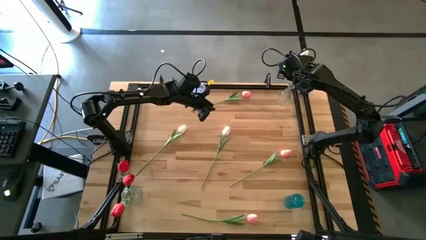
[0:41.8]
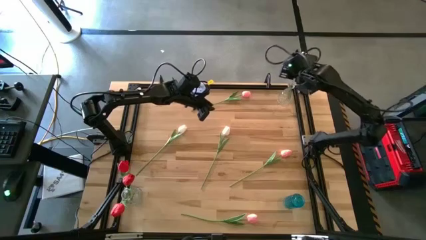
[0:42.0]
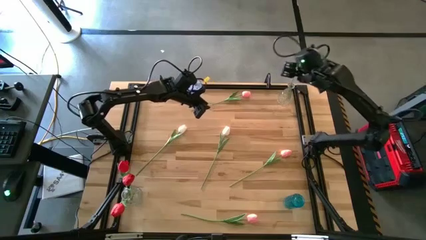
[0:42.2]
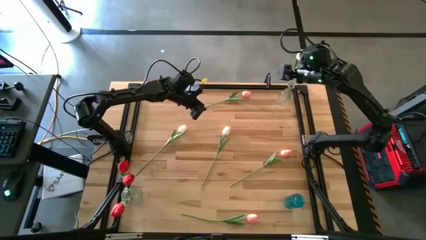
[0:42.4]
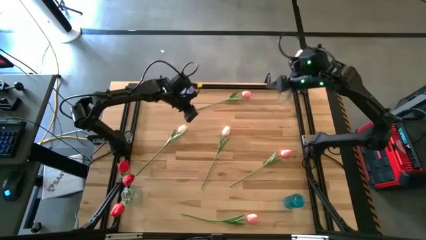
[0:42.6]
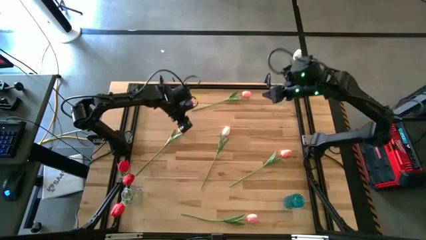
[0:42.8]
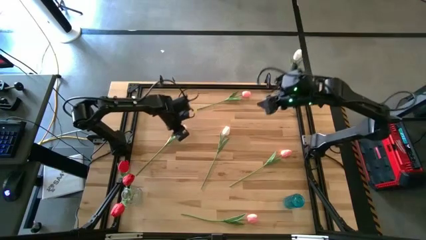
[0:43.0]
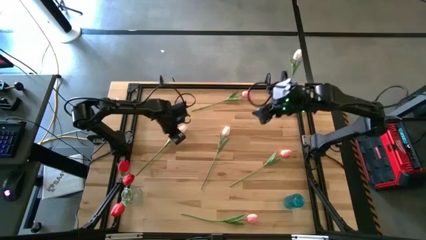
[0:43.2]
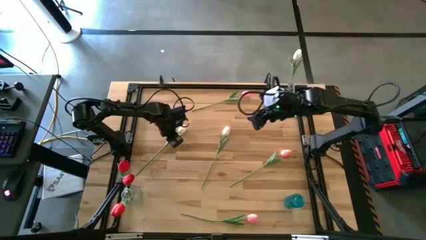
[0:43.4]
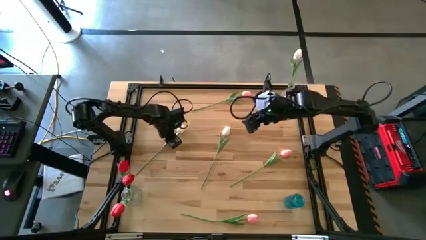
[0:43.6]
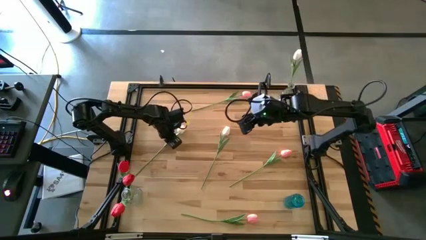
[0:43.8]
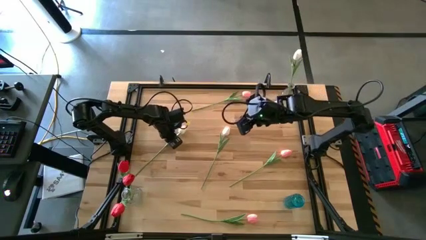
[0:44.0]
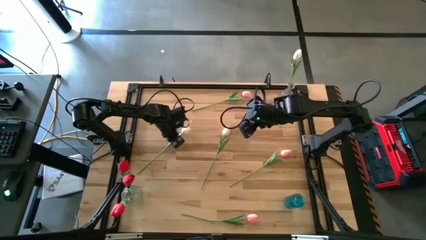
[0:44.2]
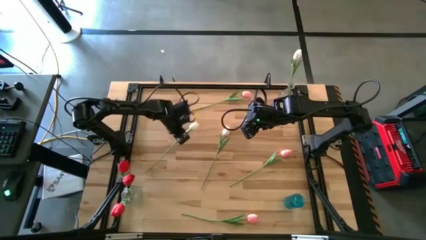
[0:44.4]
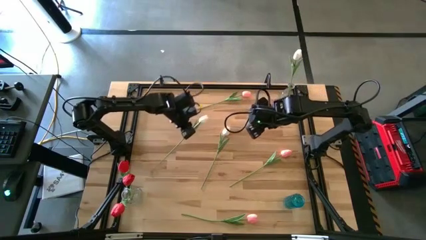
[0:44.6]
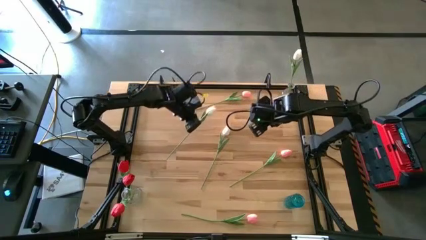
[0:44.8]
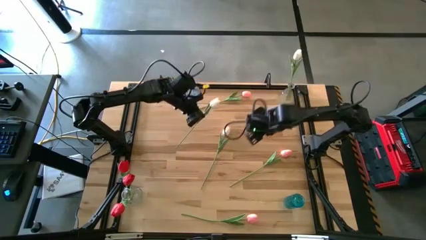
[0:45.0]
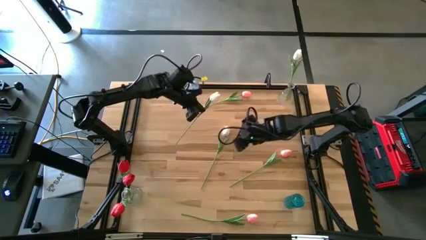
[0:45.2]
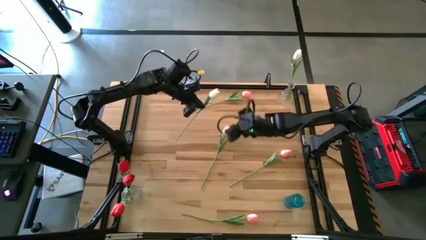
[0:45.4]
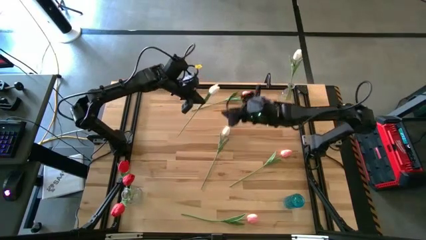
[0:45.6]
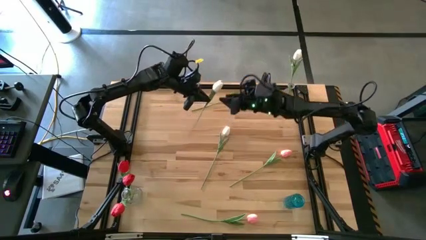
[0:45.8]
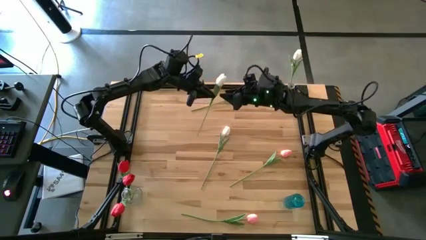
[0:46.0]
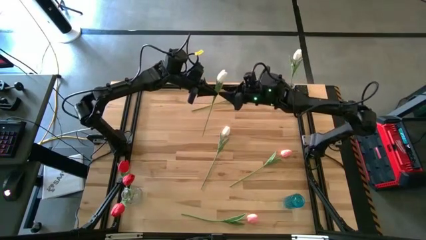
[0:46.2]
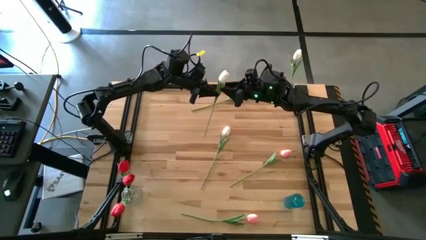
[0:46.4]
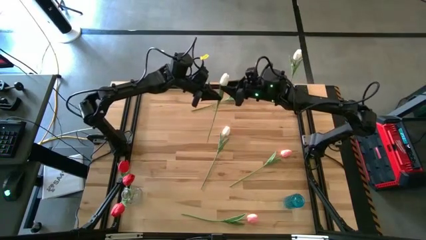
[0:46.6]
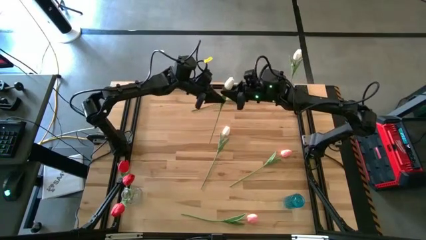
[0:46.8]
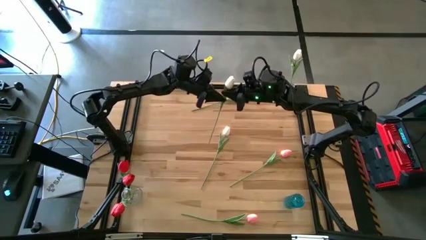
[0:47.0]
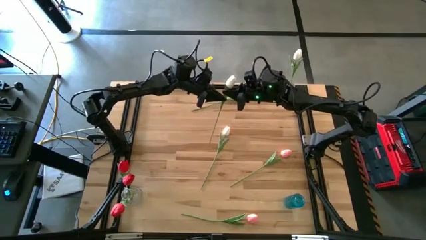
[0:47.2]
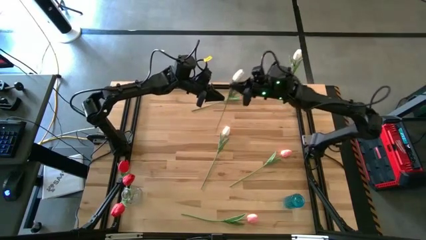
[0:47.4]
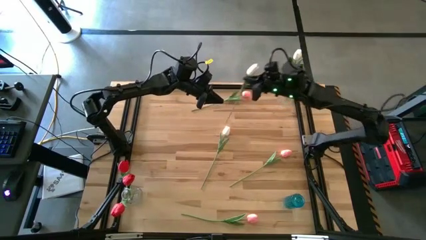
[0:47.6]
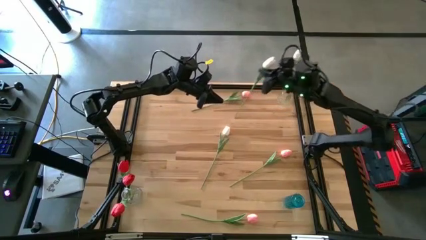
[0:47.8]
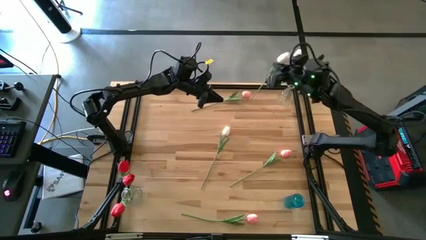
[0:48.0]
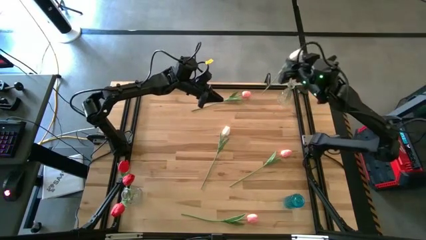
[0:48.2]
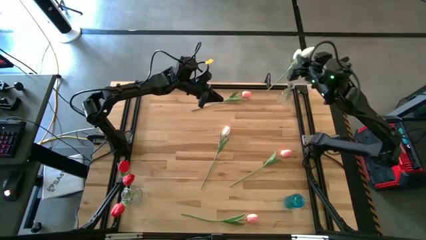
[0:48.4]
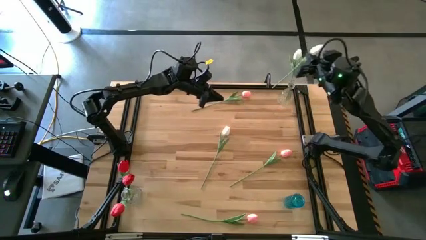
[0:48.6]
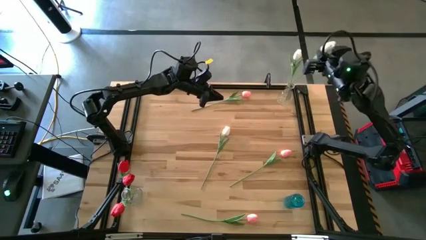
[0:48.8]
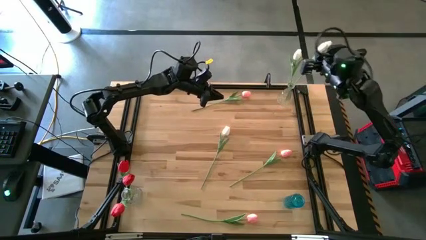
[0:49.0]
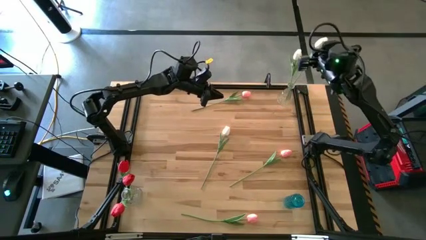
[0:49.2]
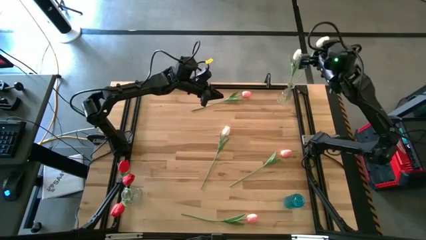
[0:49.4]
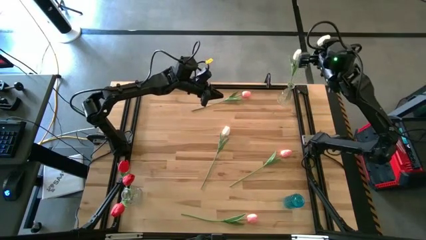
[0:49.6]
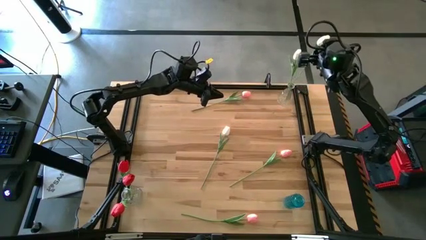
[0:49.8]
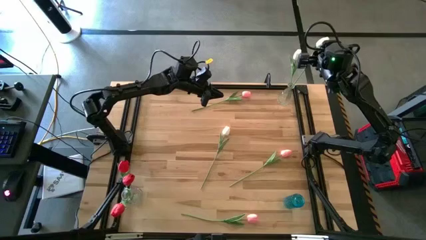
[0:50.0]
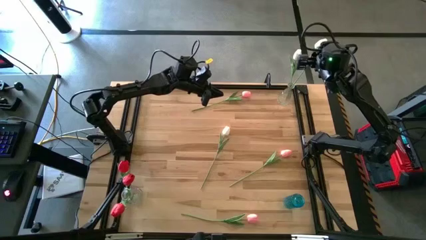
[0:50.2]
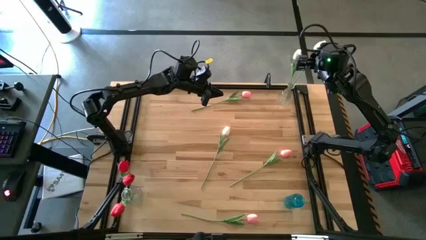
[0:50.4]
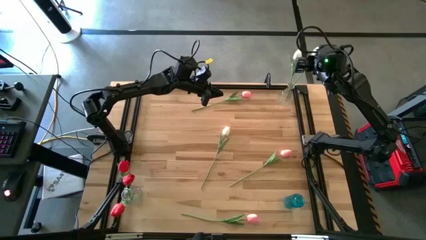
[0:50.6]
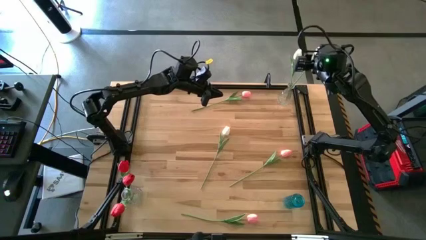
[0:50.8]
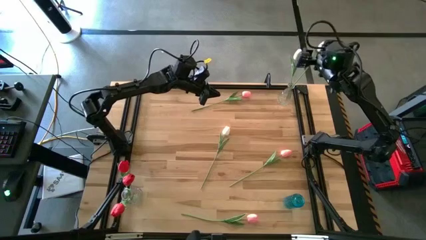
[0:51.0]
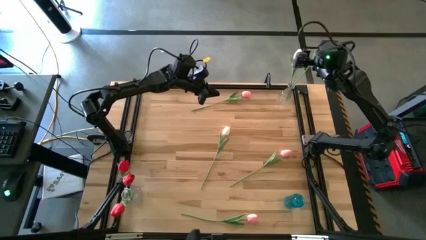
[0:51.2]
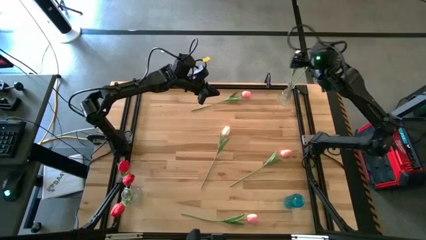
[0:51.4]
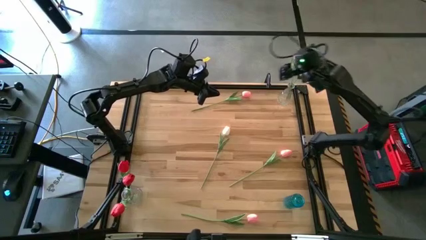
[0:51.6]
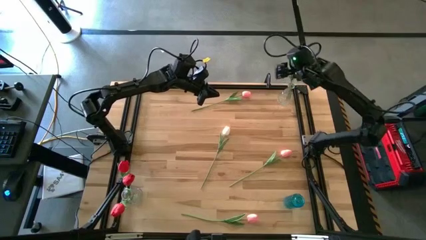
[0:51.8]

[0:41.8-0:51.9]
Task: Sort flowers into vase by color
Put the left white tulip into the transparent vase

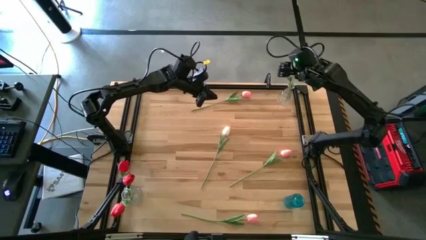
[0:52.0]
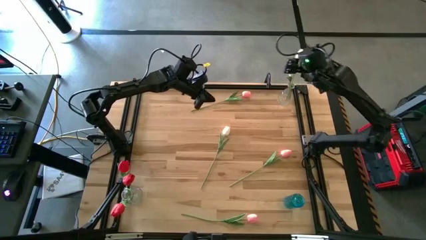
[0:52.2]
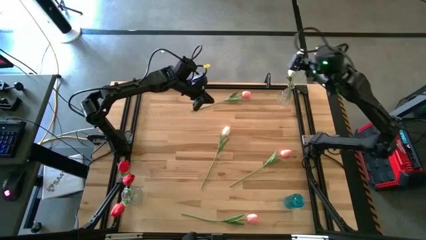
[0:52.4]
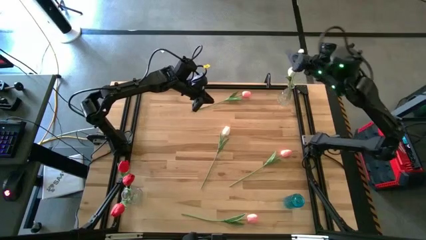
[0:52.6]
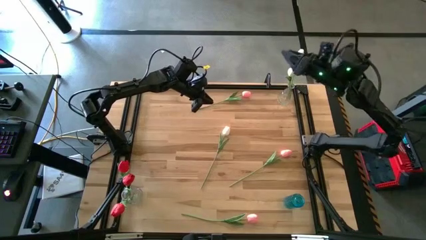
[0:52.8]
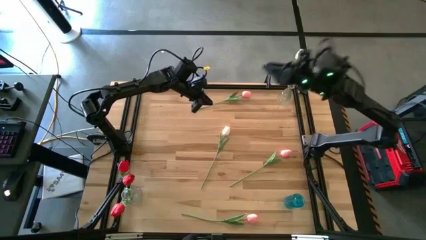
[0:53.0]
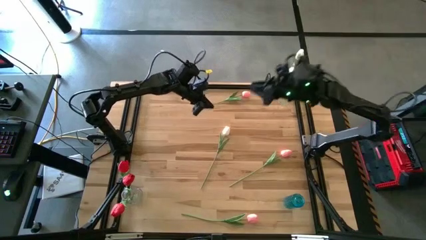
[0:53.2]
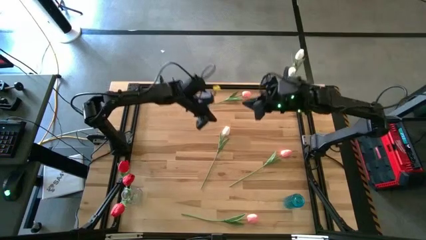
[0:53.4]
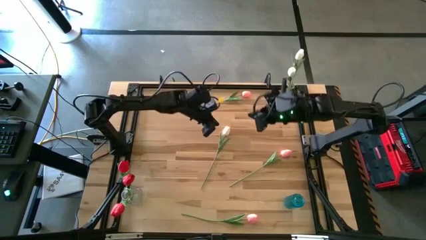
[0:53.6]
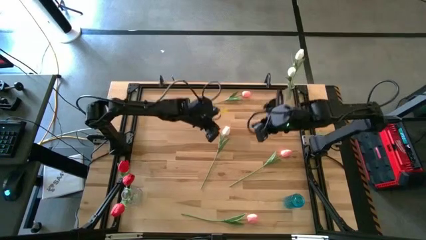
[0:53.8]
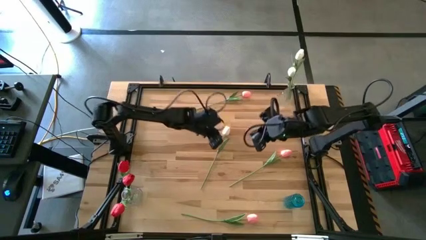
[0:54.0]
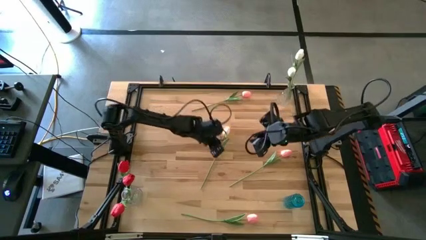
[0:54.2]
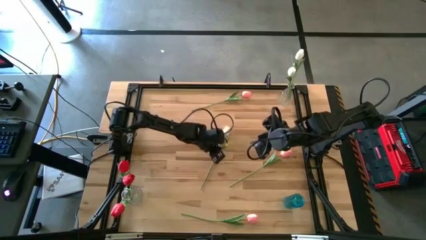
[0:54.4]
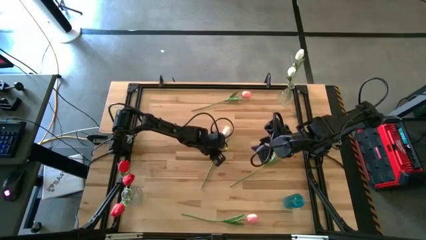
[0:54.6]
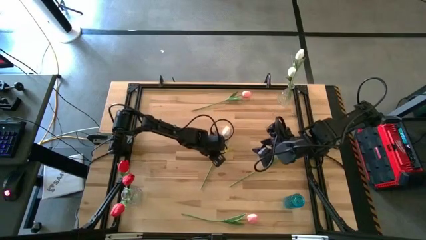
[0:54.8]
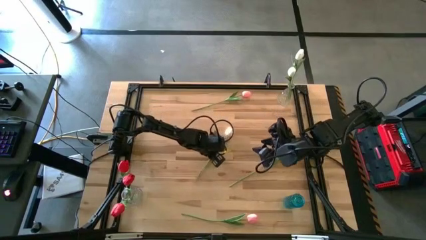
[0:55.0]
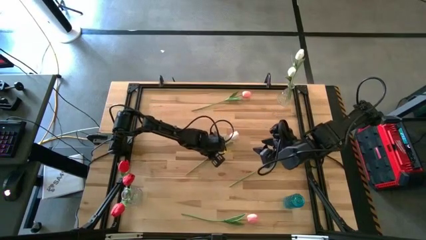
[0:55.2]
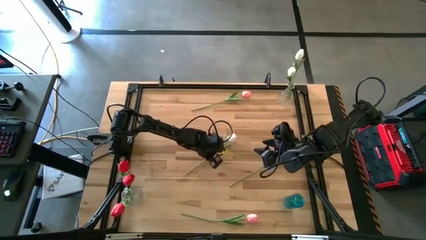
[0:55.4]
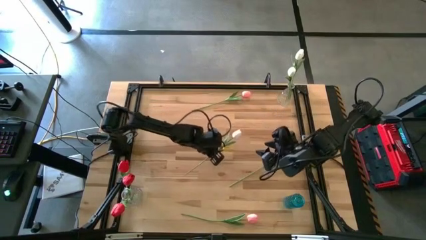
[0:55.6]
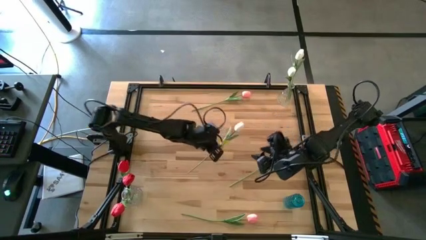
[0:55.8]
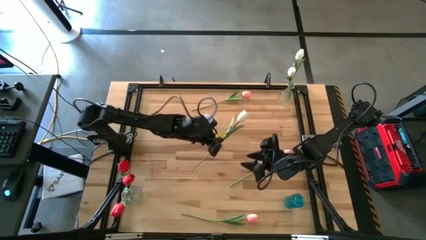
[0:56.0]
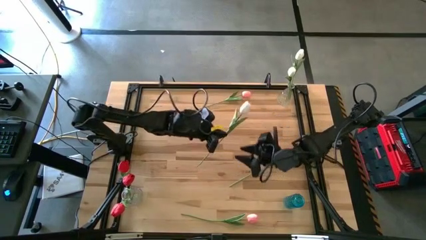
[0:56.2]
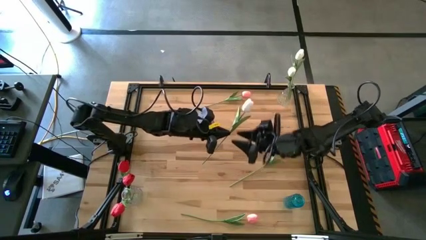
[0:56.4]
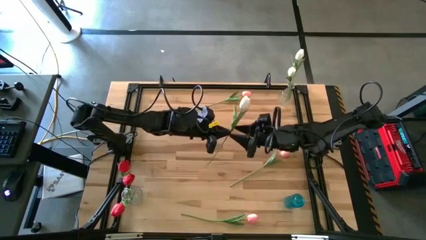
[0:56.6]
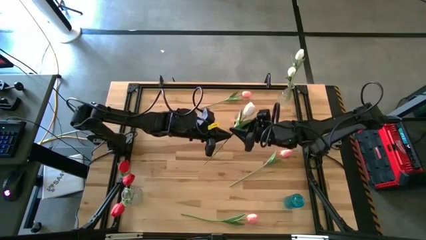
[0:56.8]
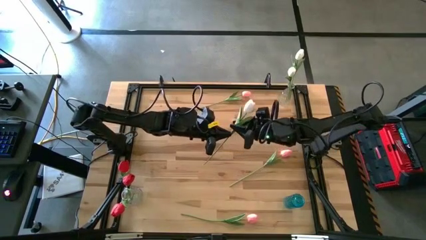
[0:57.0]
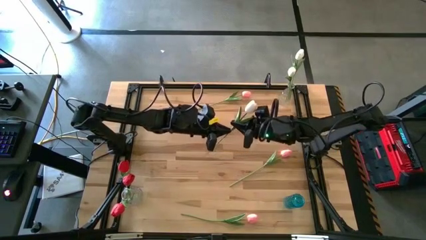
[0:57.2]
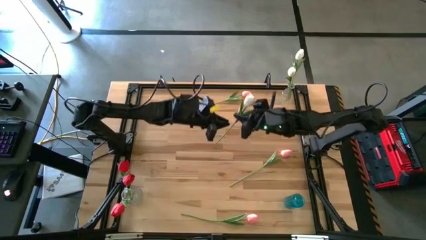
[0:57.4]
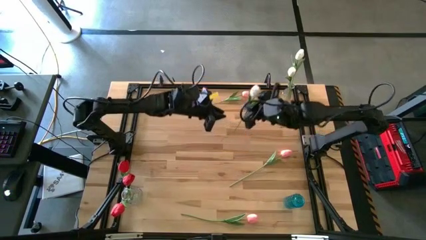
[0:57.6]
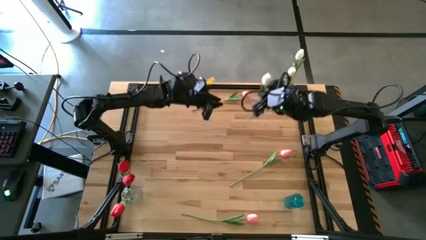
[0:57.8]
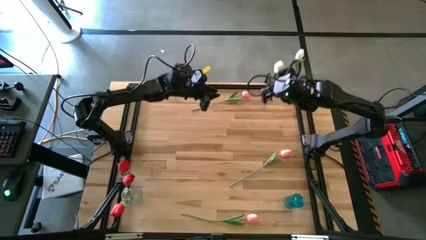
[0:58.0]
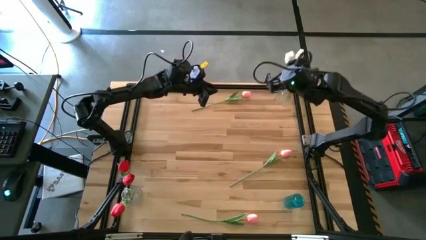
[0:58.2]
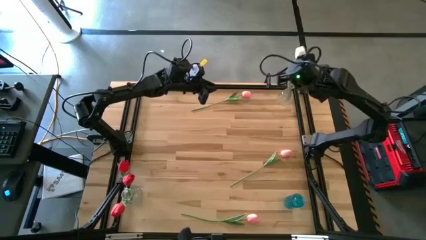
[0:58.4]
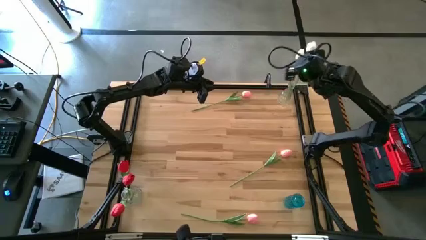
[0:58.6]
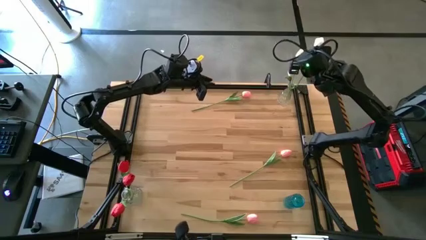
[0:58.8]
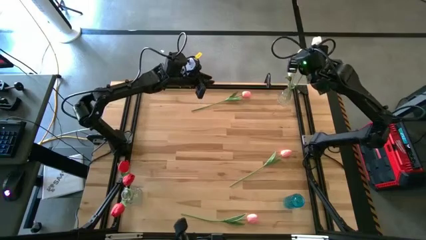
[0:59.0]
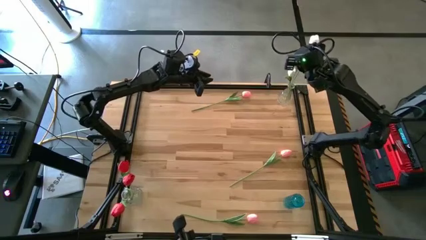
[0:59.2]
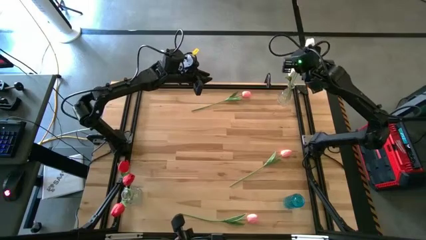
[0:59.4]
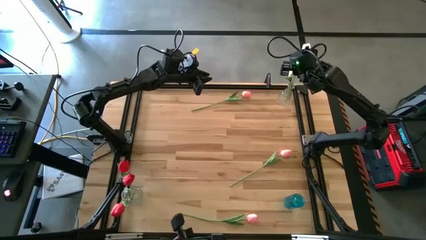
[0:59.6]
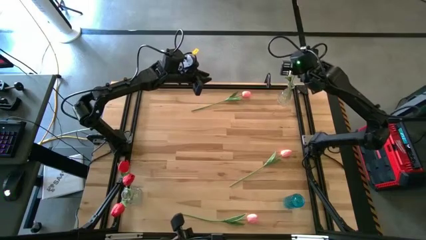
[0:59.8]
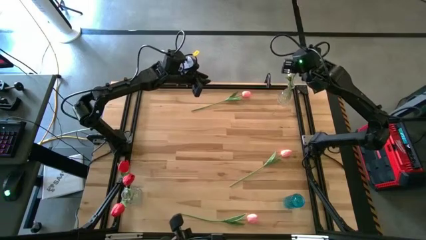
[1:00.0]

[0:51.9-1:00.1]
Put the white tulip into the transparent vase
